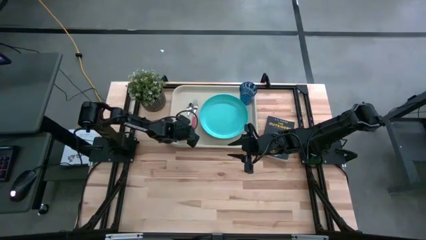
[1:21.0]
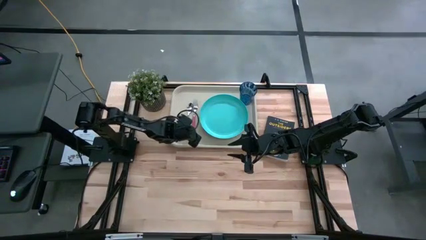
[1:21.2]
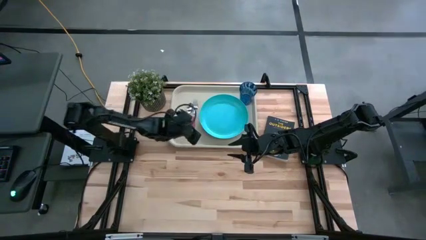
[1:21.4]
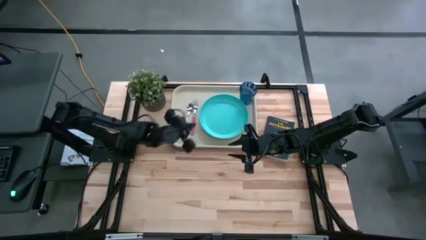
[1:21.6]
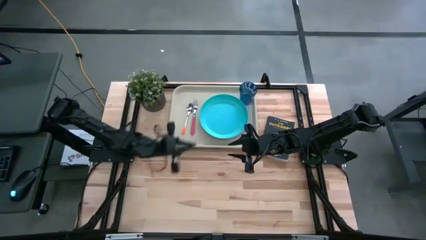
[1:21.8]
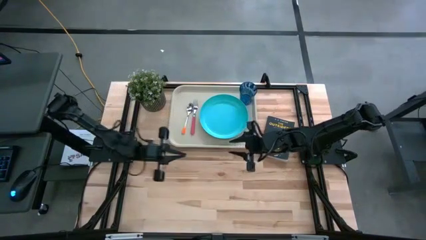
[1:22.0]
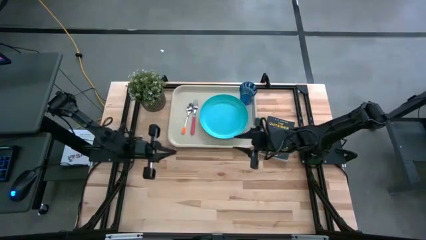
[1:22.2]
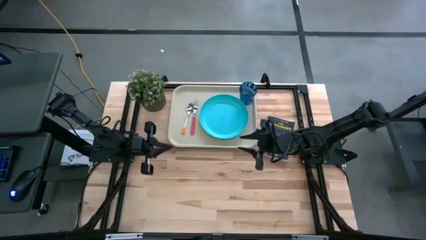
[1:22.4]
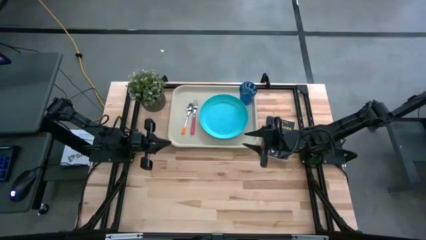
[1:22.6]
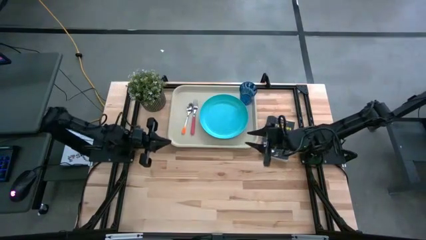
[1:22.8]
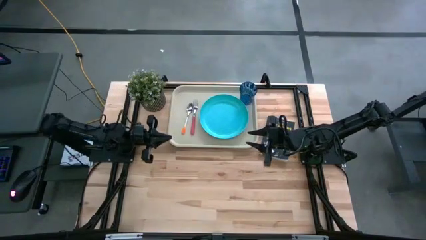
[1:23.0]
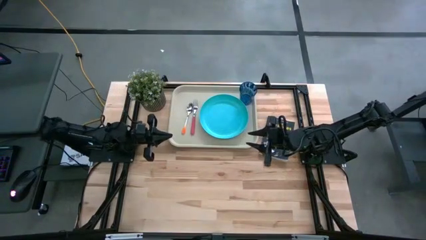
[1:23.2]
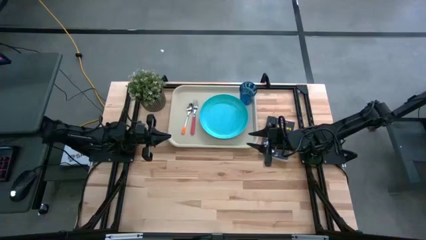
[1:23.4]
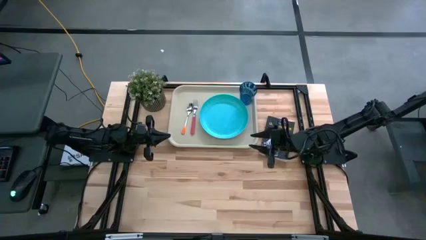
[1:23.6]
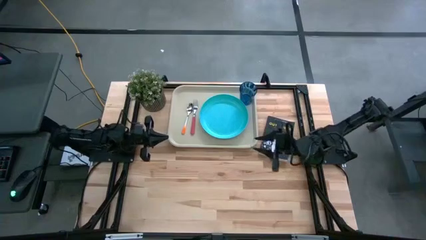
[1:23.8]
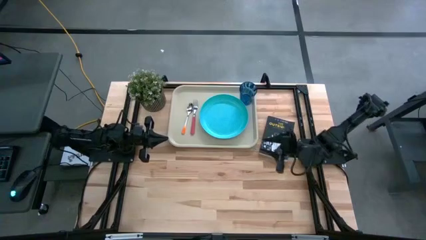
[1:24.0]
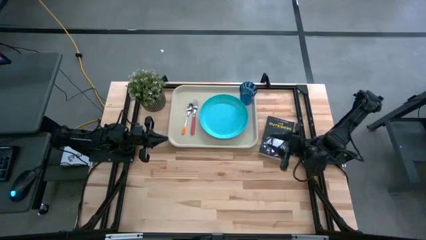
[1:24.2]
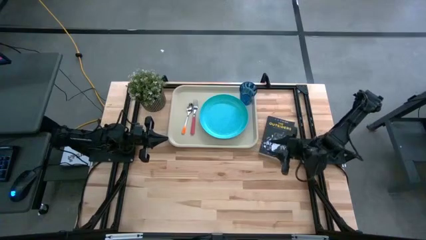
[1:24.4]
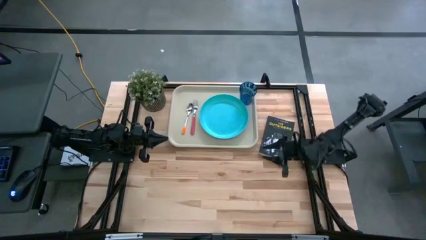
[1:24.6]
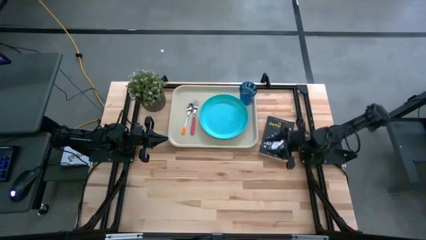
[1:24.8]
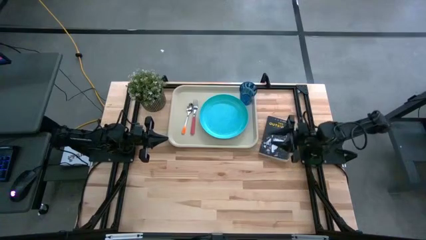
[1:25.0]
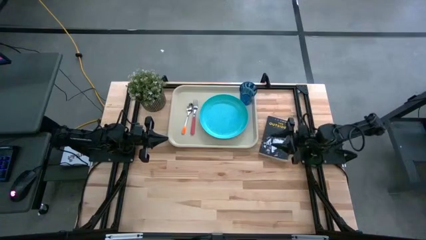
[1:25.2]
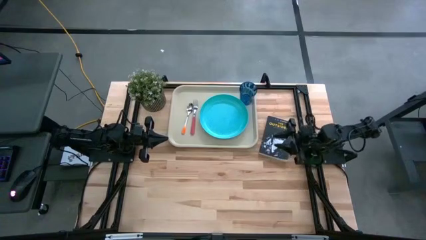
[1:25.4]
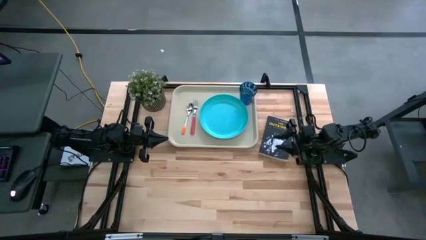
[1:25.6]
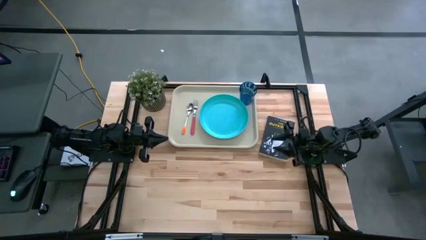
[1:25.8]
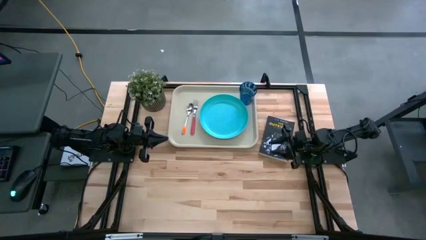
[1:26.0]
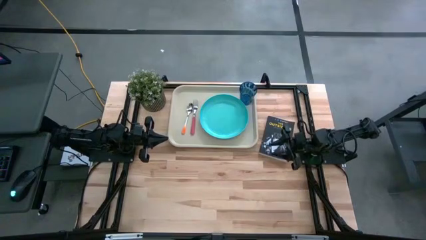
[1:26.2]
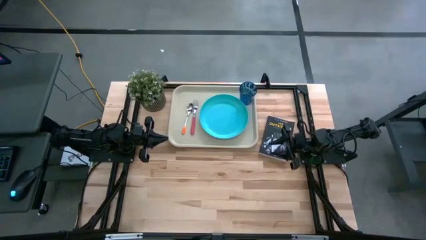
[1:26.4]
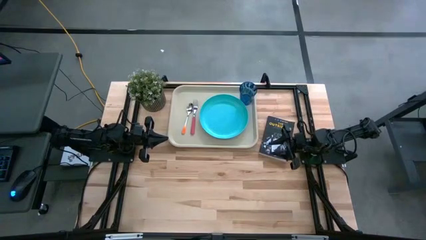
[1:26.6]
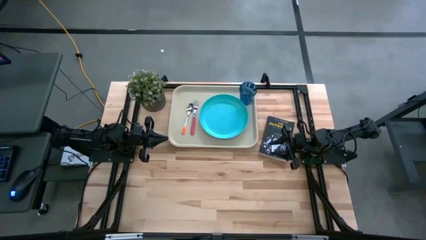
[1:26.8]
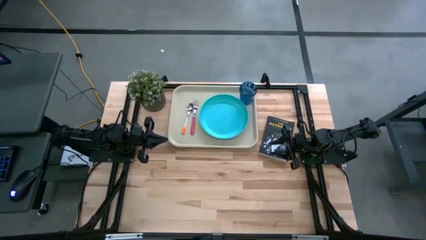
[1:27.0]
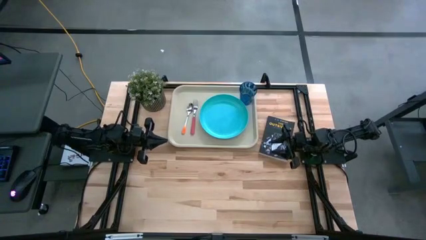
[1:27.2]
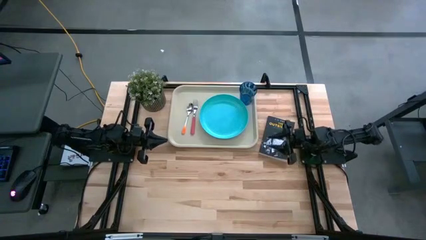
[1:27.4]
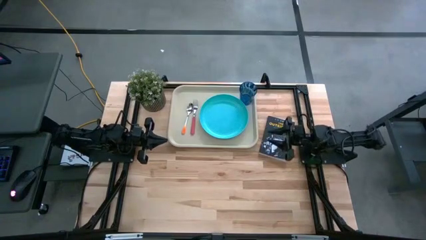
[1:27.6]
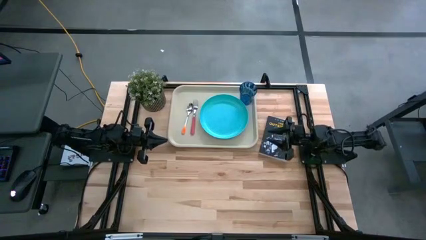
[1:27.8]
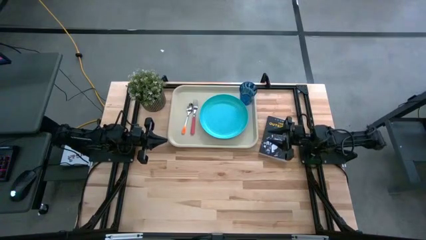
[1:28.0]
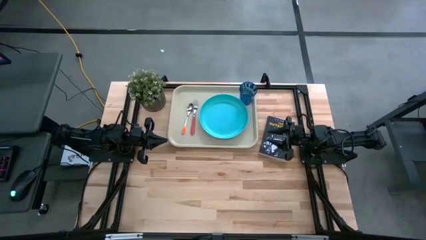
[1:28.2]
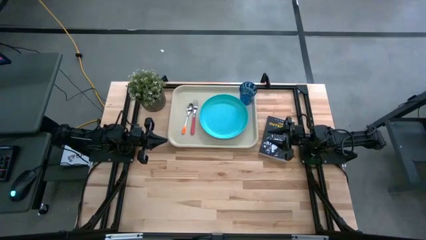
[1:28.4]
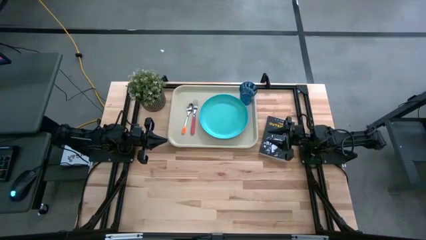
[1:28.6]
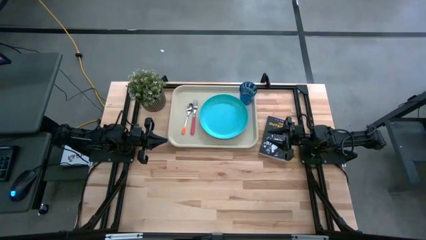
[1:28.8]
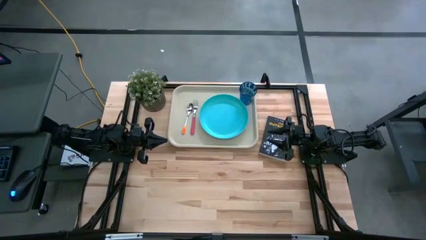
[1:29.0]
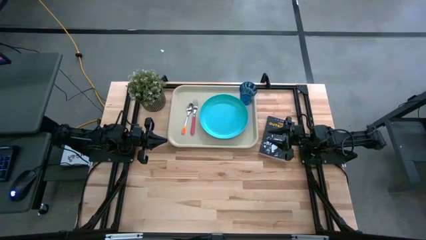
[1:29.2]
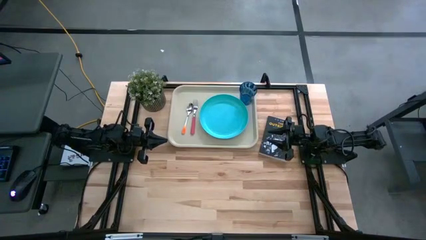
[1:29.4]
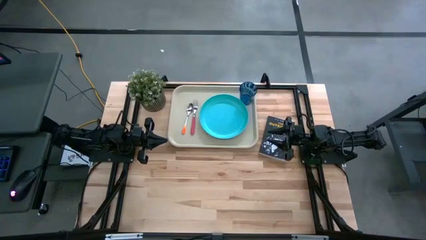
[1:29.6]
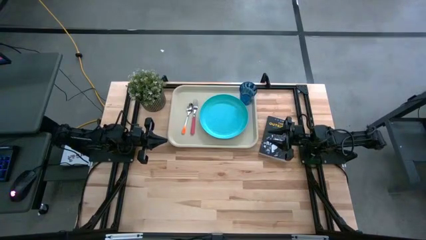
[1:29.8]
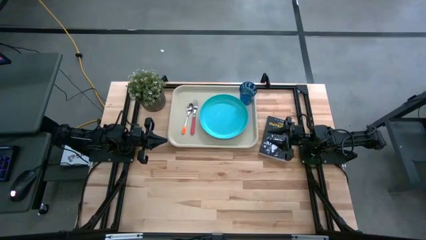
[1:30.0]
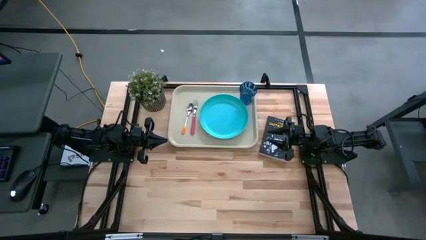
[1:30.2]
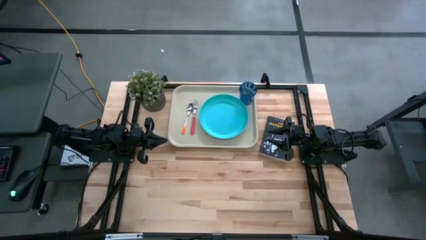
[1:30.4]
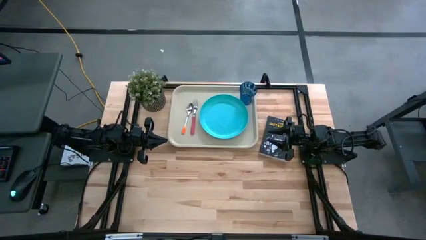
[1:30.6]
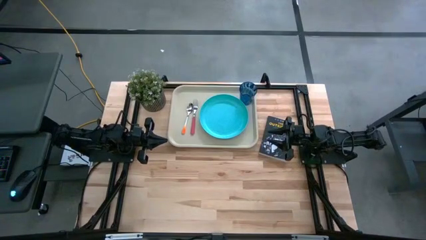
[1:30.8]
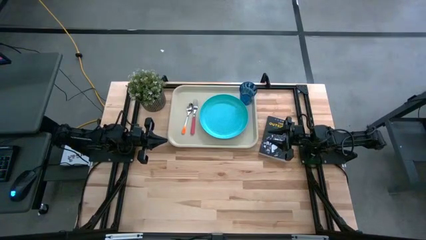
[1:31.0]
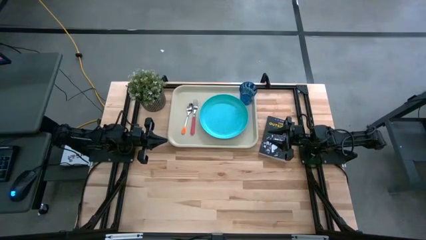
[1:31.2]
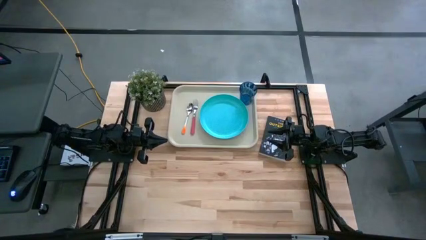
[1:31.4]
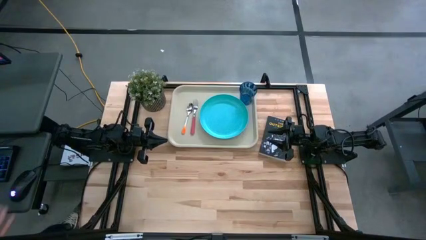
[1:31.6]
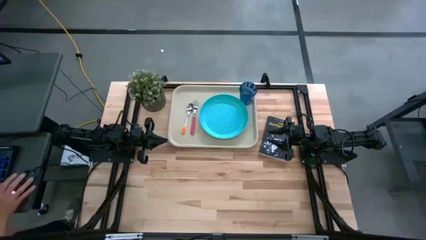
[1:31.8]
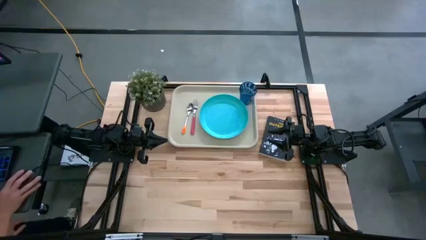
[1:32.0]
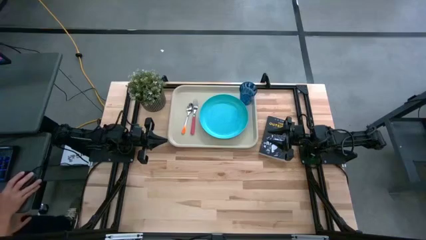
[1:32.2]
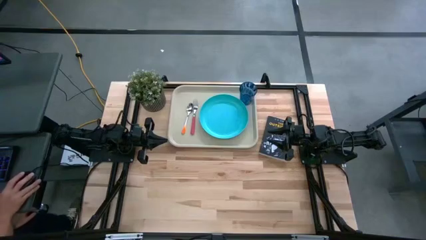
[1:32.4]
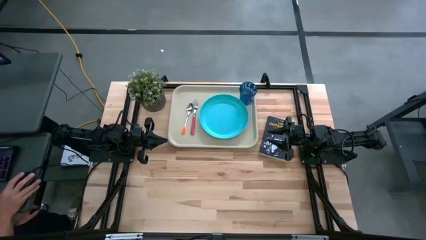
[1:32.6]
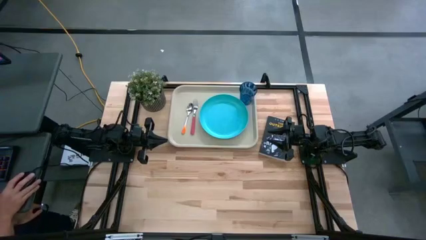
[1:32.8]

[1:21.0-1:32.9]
Task: Pick and place plate/cup/fork/spoon on tray
Return to Home Position
